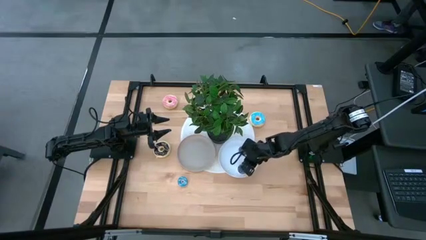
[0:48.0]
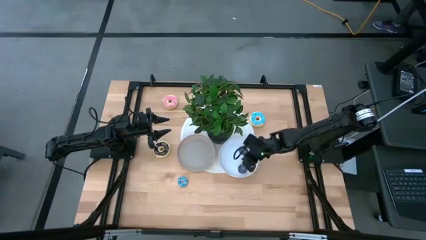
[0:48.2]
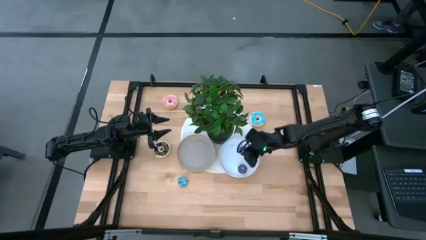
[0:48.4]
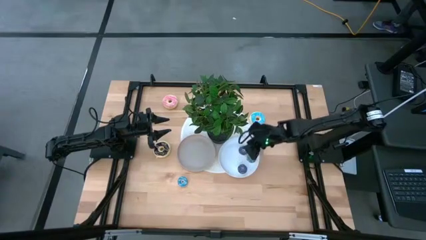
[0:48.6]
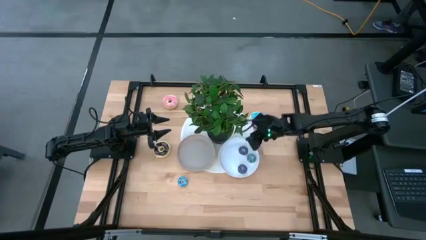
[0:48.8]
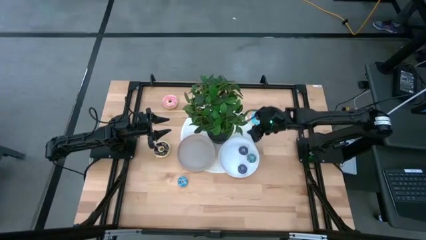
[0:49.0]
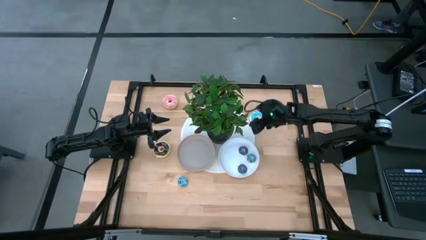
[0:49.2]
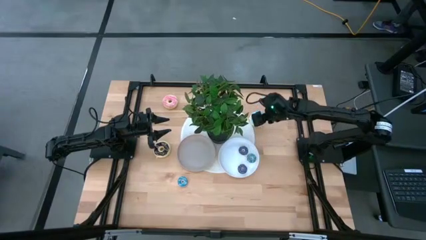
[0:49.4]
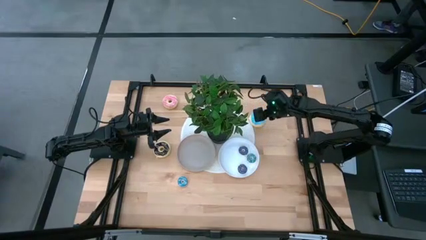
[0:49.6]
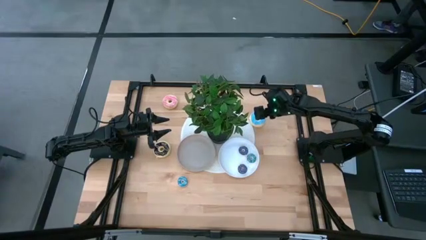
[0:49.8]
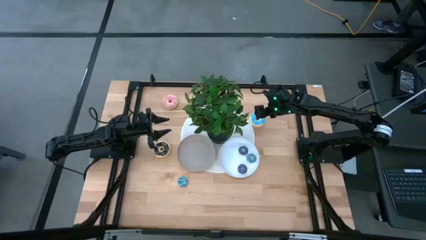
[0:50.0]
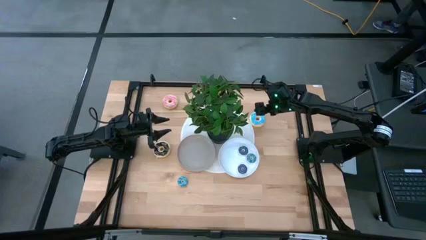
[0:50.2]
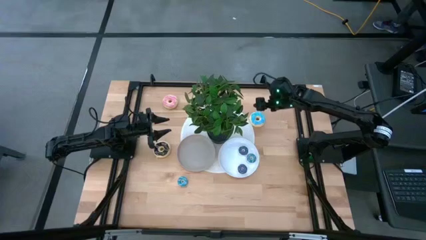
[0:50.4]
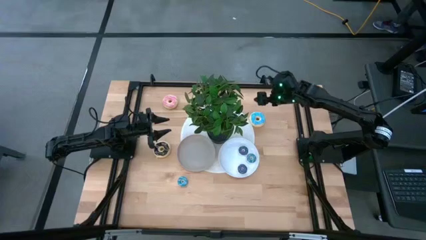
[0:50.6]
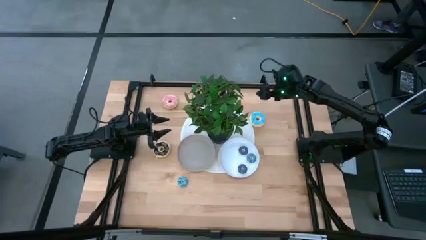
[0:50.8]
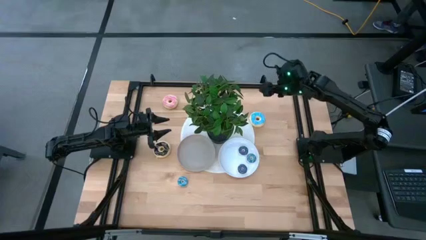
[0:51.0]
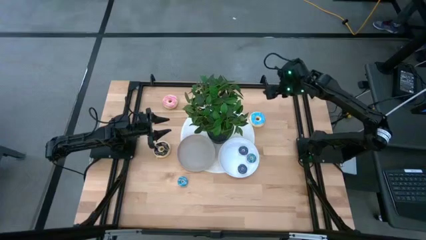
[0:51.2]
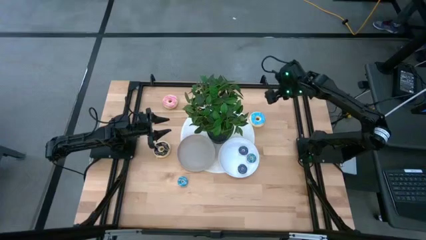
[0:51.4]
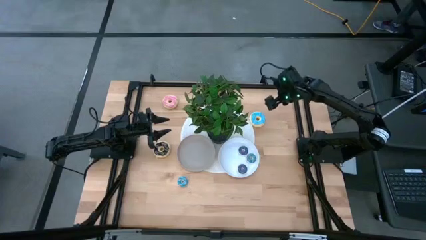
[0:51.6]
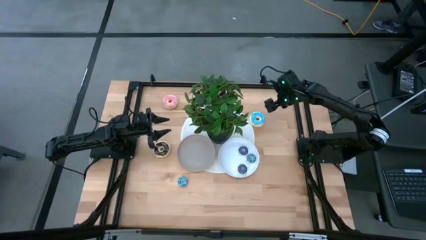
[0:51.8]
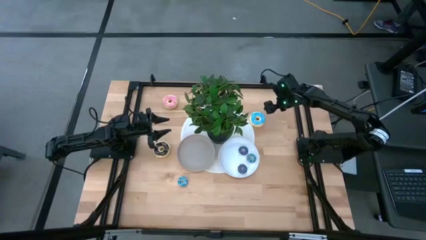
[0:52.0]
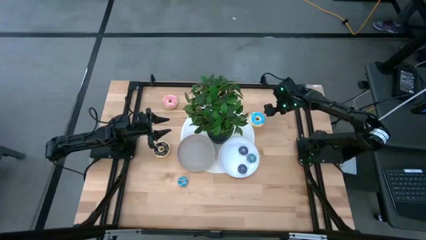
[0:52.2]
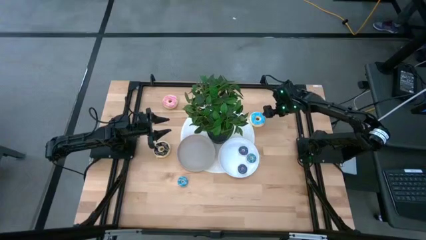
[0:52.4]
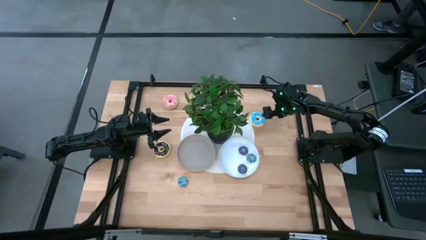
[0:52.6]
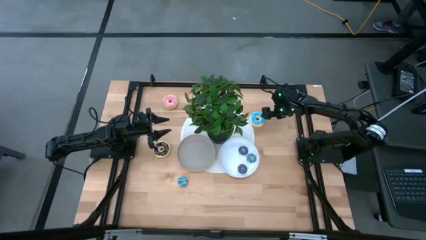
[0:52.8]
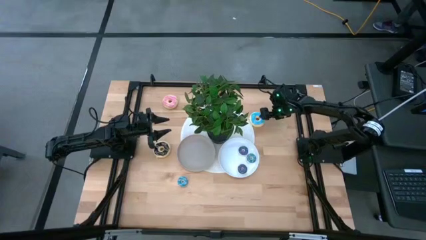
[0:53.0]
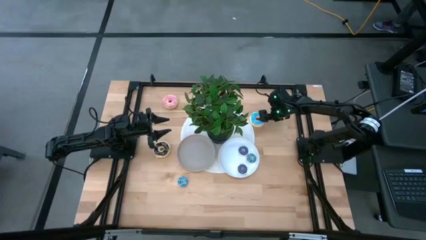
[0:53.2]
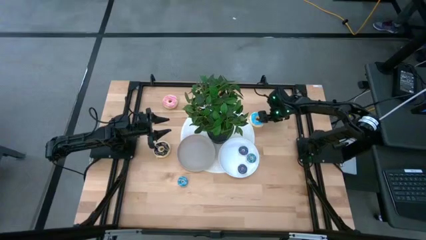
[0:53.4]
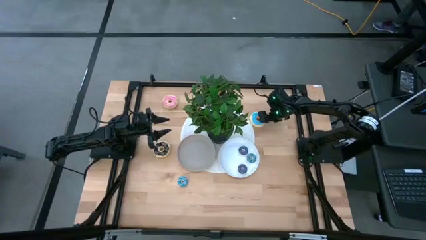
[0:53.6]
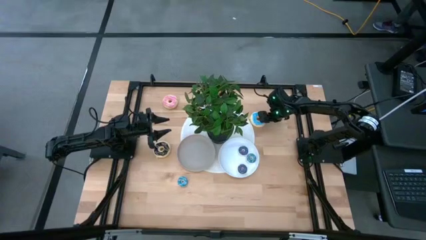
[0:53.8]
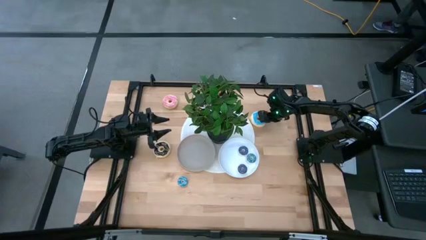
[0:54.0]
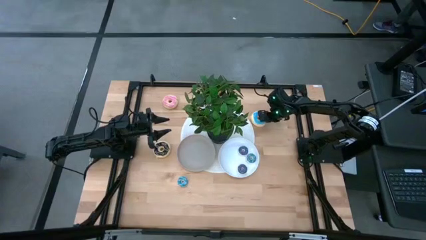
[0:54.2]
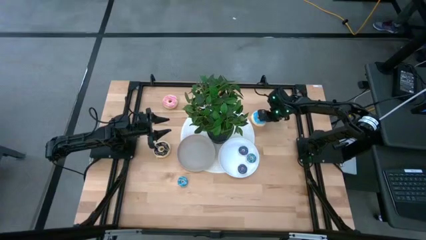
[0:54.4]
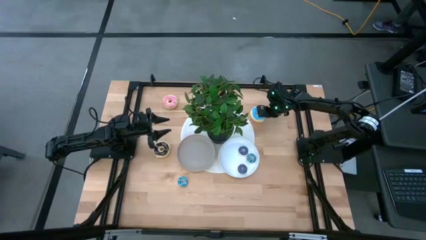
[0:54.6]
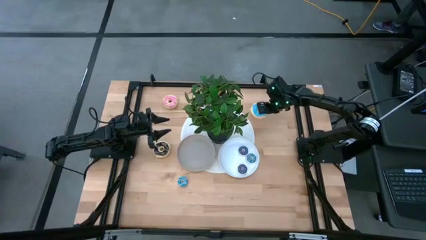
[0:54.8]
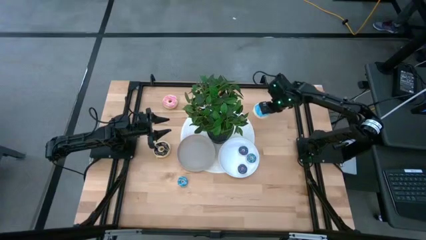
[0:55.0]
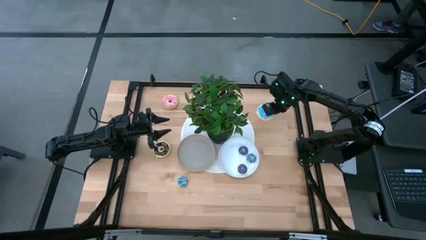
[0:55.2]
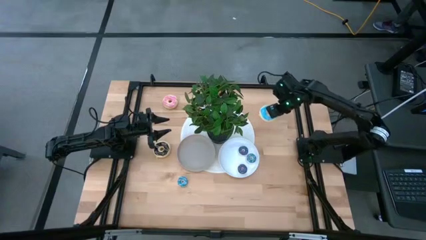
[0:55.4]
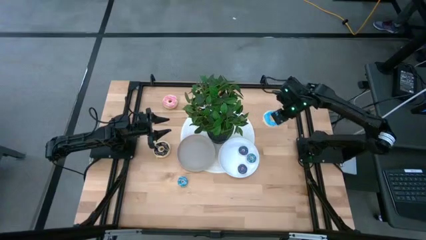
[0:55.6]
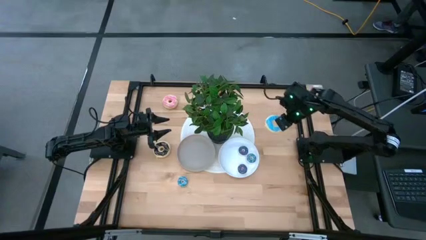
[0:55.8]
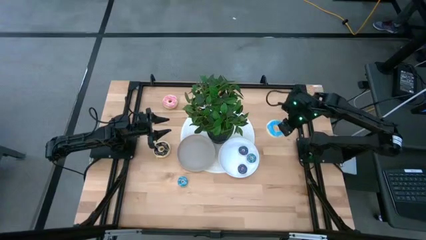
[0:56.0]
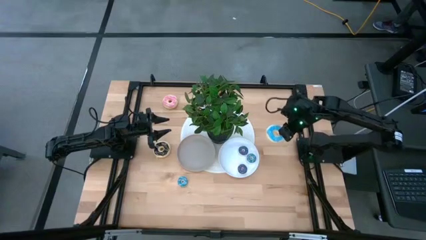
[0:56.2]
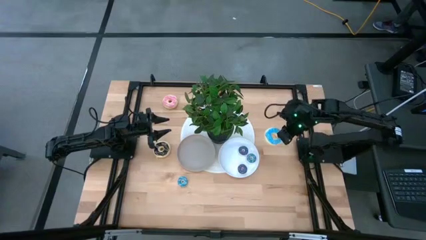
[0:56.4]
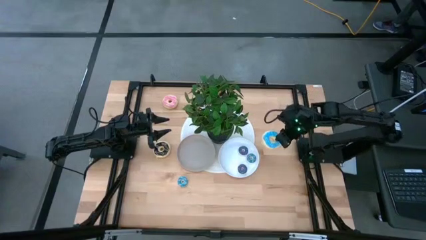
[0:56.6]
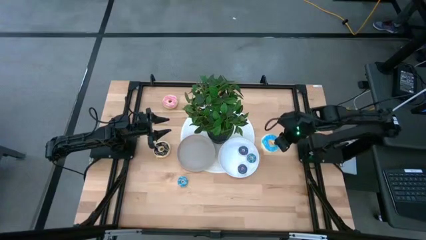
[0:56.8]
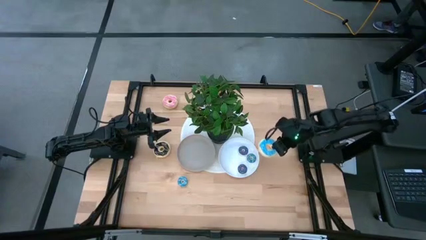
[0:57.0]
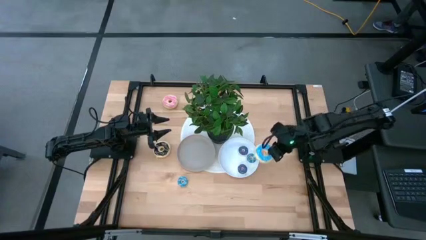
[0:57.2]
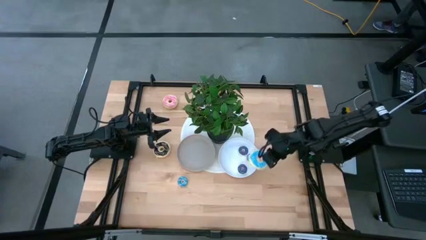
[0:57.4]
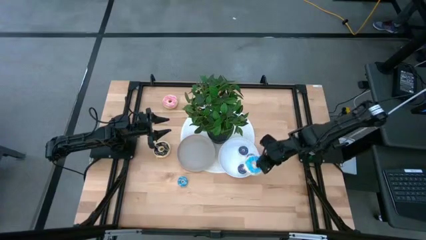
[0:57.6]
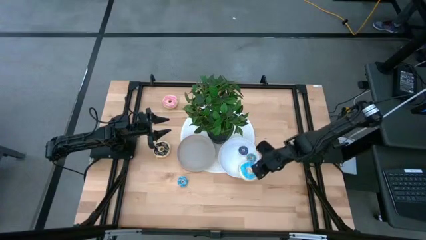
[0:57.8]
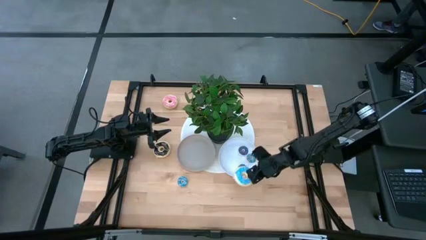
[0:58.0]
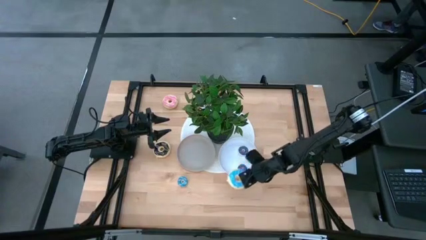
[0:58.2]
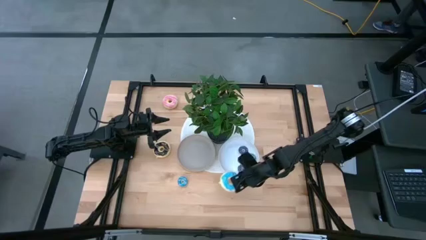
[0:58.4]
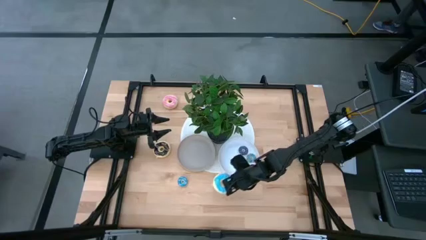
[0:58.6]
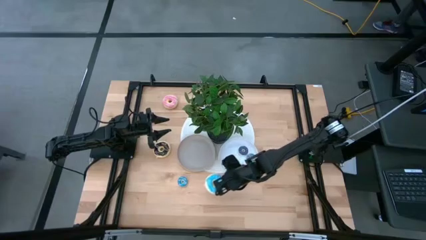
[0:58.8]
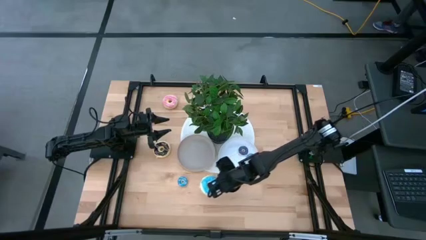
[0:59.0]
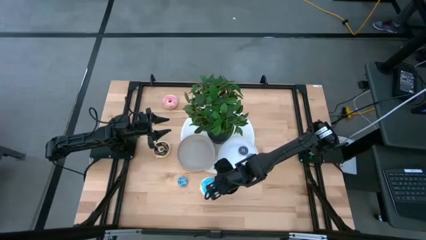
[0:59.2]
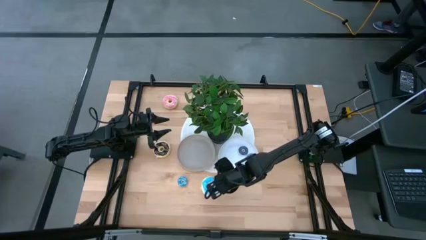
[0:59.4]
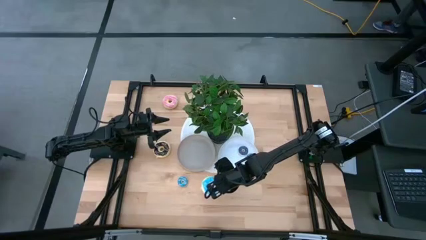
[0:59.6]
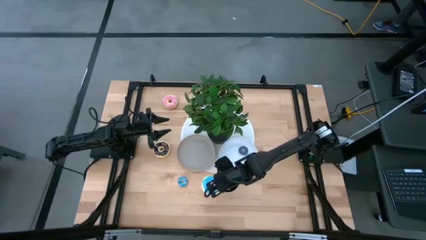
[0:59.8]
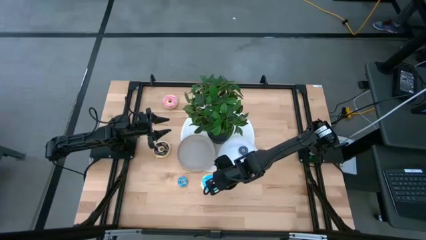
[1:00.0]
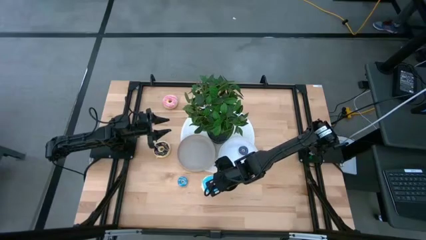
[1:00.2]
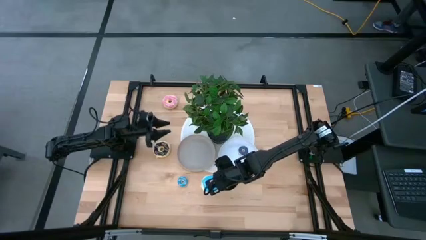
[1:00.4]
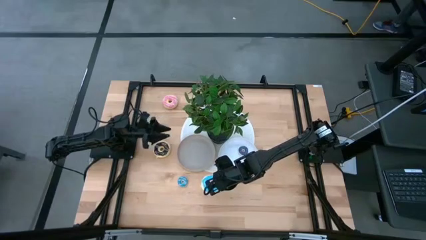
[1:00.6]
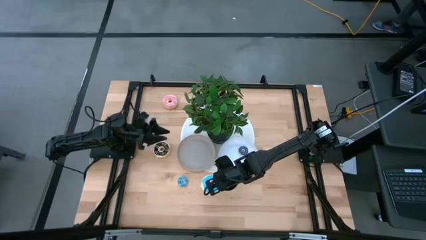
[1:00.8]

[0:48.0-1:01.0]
Task: Pick & Place donuts
Put the large blue donut on the beige plate

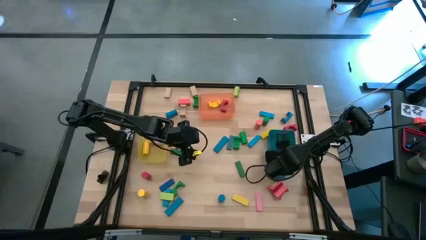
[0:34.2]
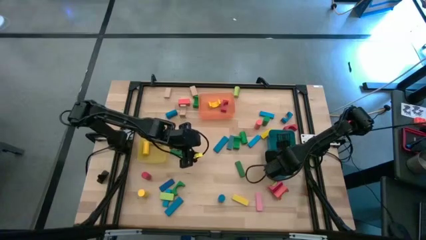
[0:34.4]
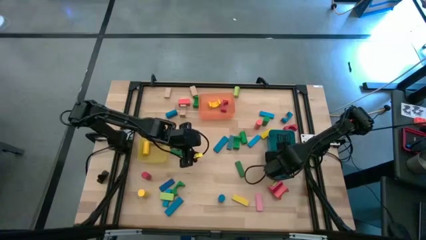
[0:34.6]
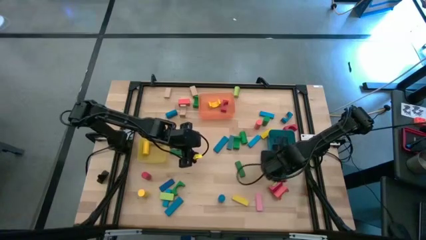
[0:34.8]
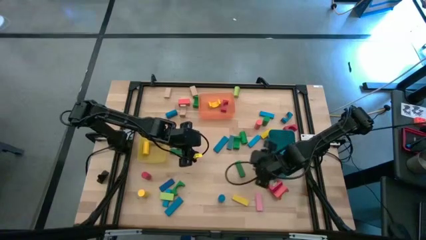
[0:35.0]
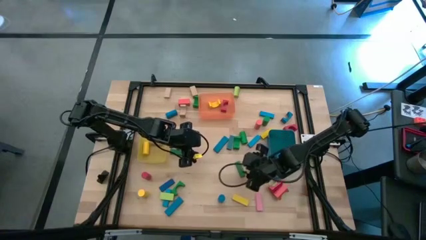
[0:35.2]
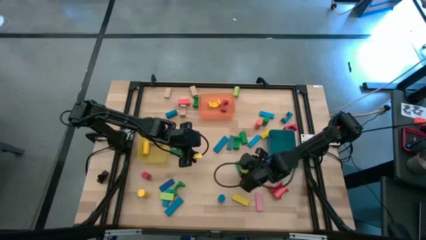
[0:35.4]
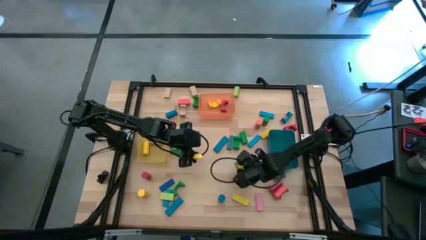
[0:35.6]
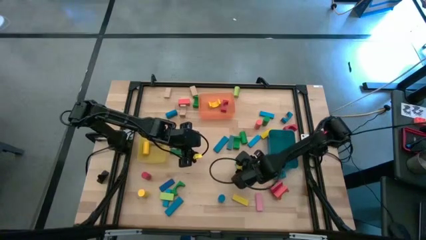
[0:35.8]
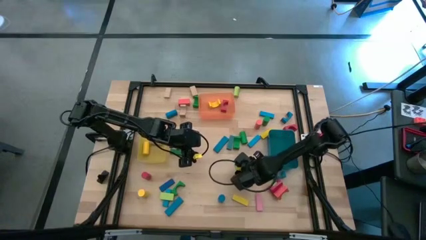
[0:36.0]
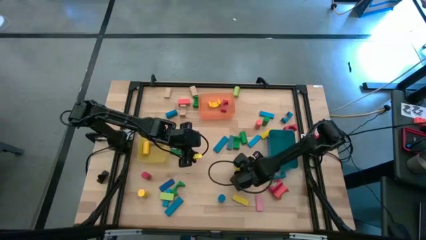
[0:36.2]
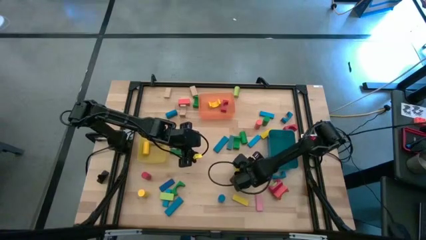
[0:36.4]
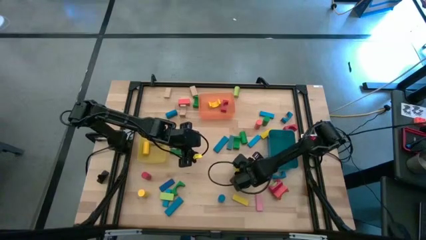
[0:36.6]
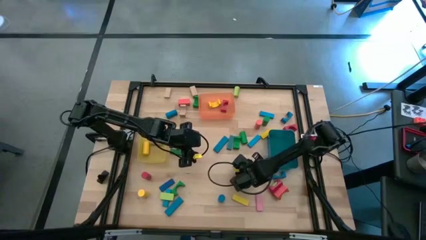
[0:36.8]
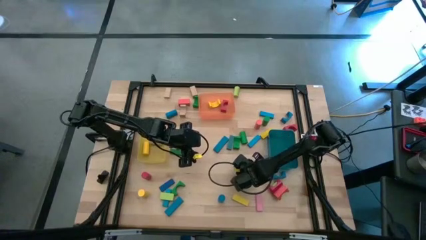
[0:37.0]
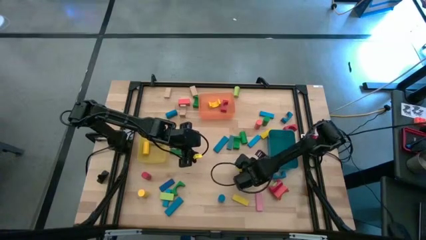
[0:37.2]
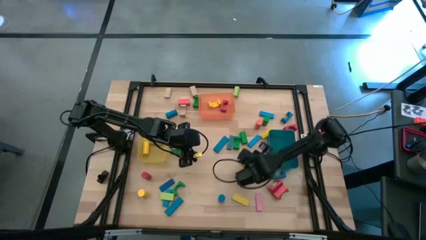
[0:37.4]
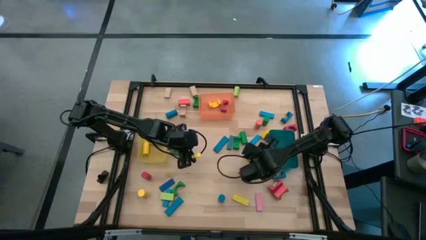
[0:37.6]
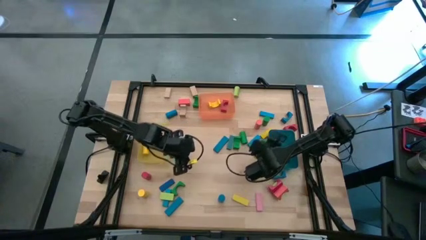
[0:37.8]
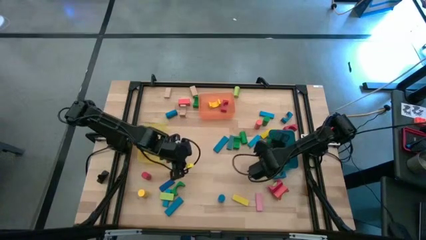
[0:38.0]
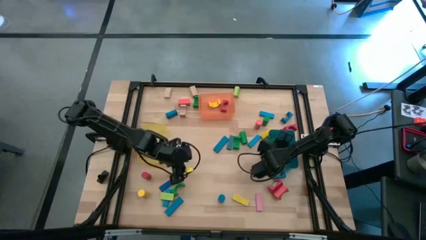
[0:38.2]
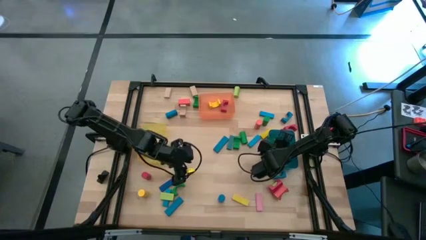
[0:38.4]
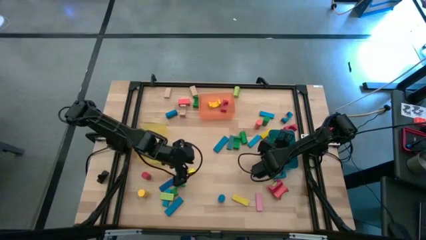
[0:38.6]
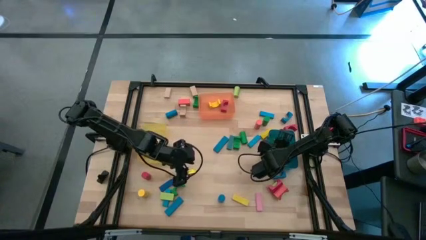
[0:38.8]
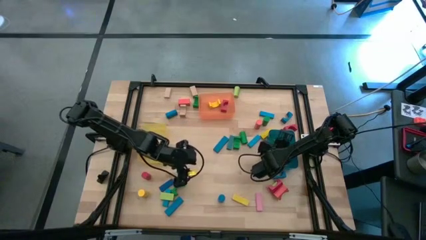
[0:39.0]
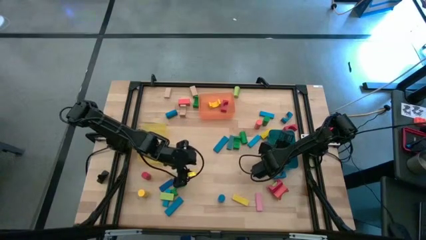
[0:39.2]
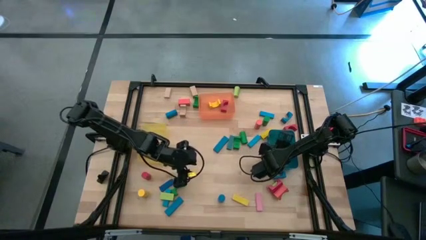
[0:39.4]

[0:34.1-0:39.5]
Task: Sort blocks by size
Put the green rectangle block into the blue bin
